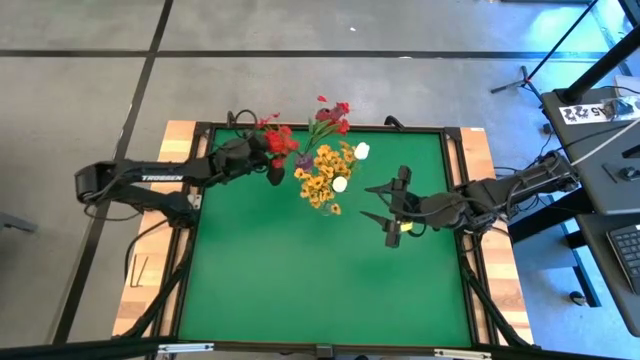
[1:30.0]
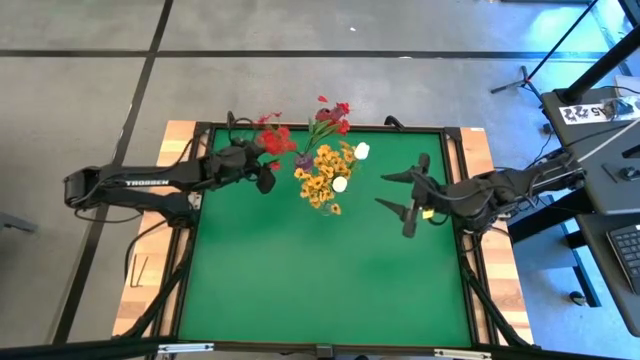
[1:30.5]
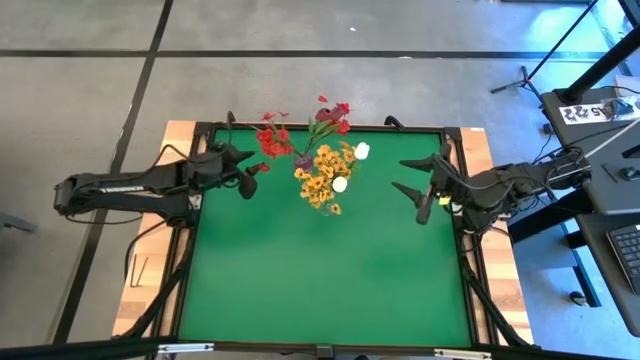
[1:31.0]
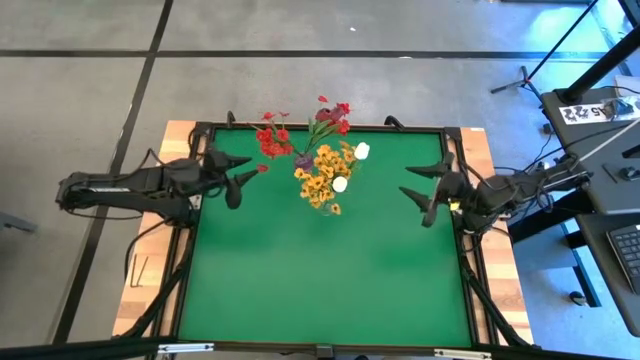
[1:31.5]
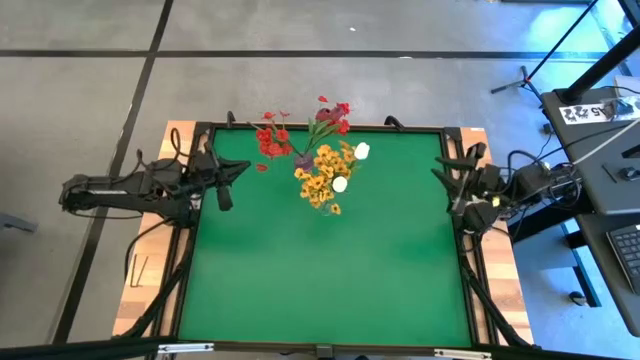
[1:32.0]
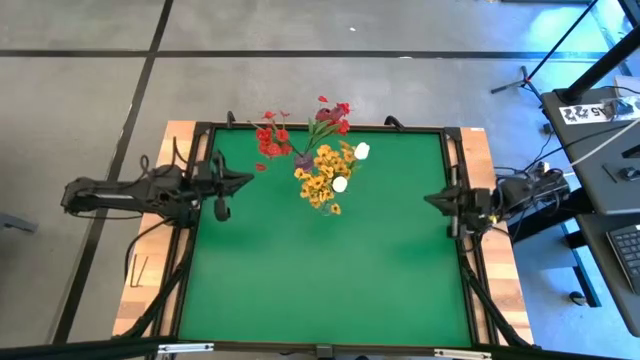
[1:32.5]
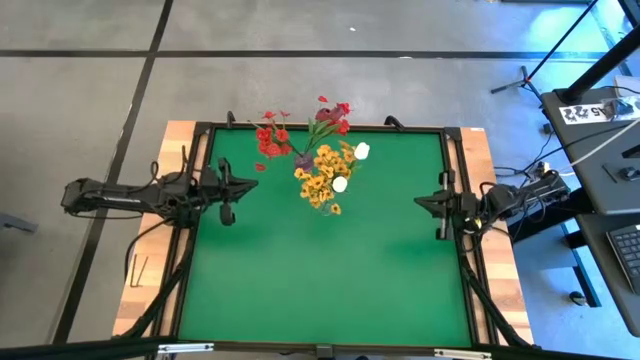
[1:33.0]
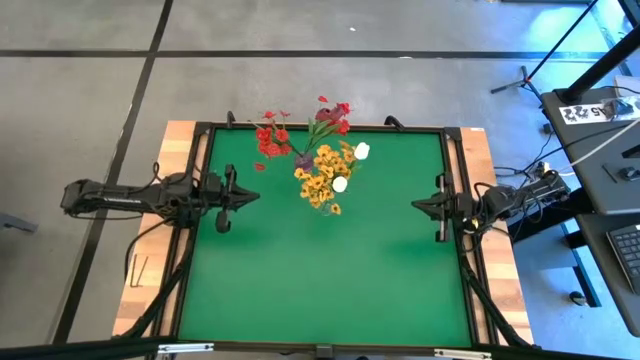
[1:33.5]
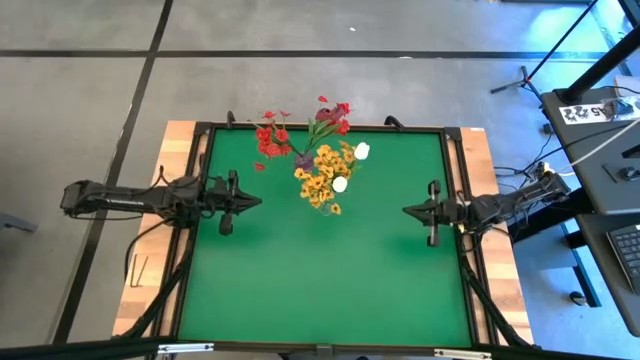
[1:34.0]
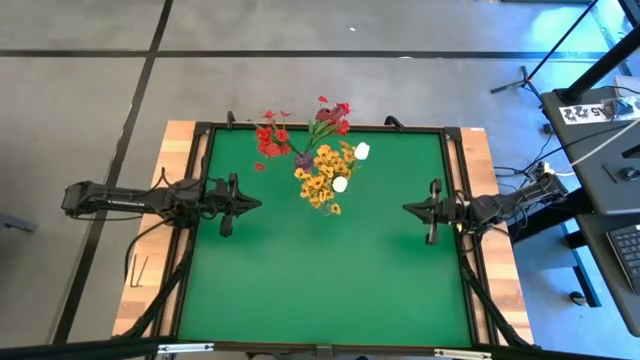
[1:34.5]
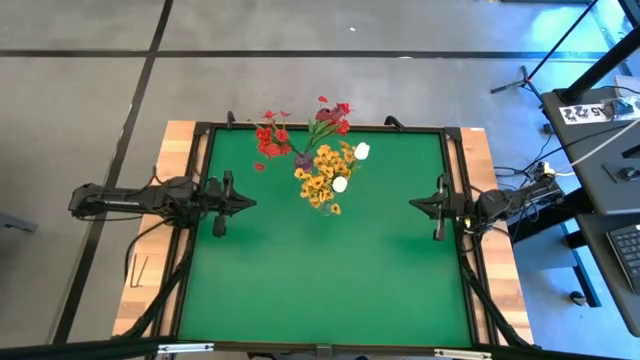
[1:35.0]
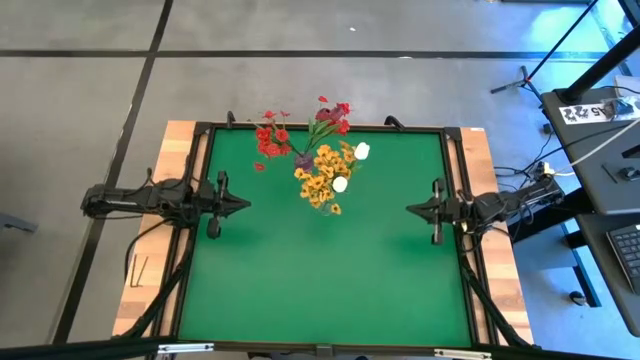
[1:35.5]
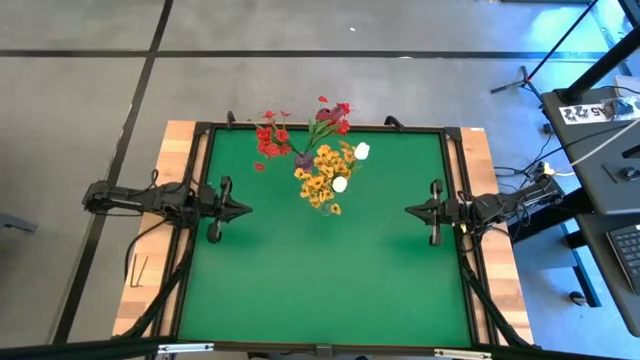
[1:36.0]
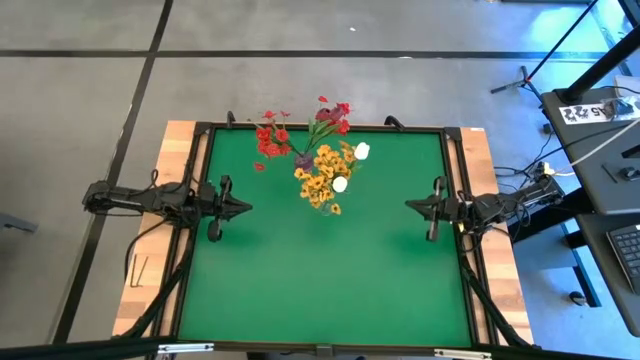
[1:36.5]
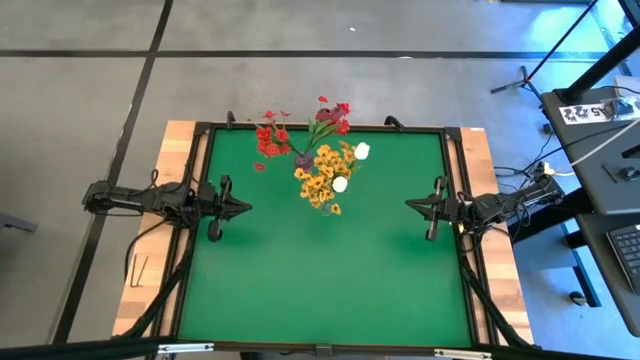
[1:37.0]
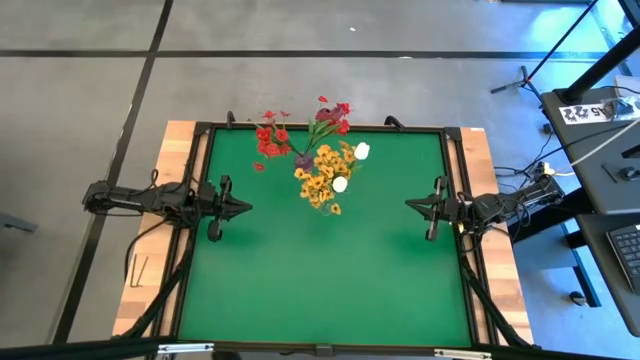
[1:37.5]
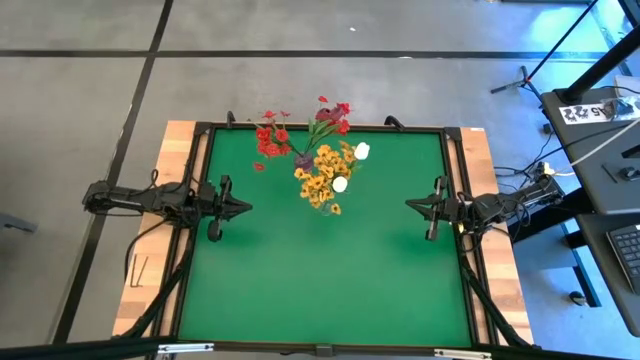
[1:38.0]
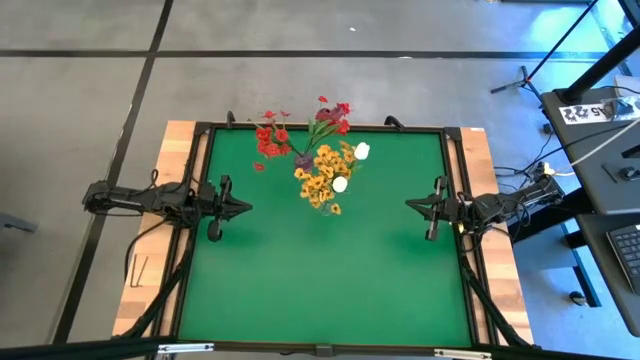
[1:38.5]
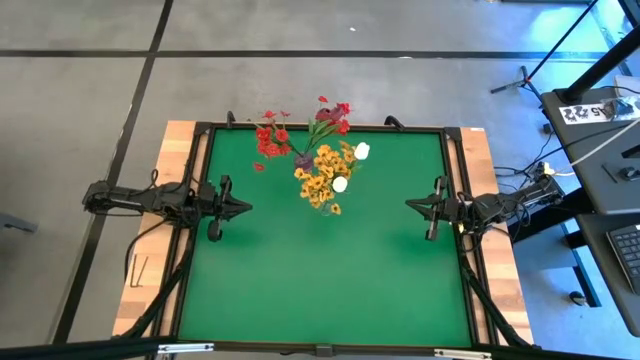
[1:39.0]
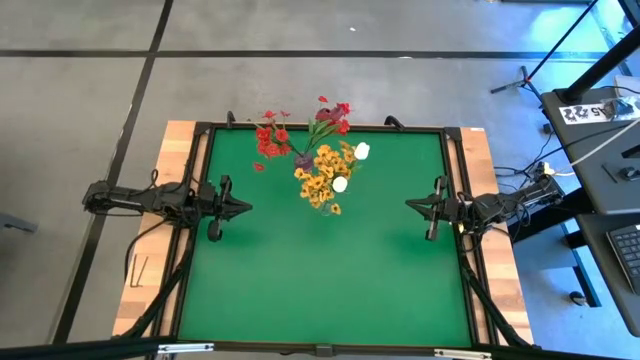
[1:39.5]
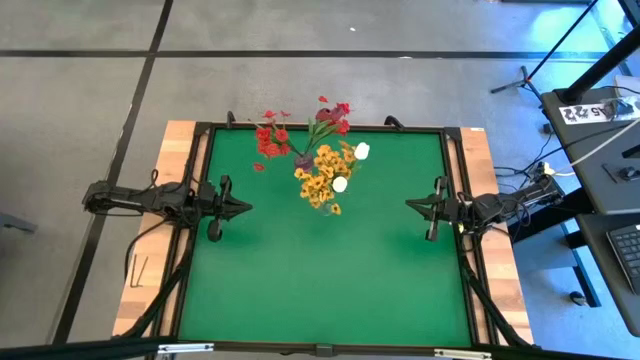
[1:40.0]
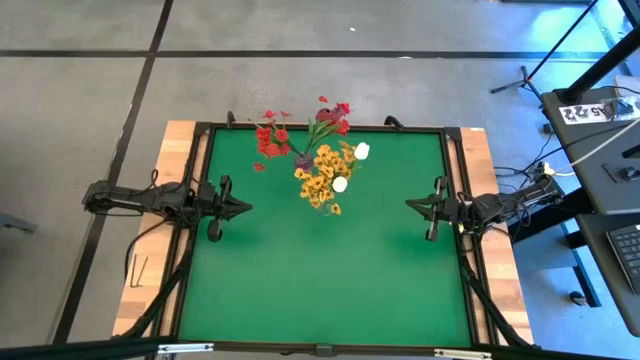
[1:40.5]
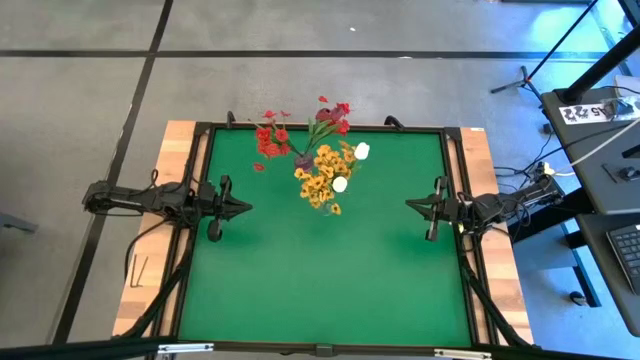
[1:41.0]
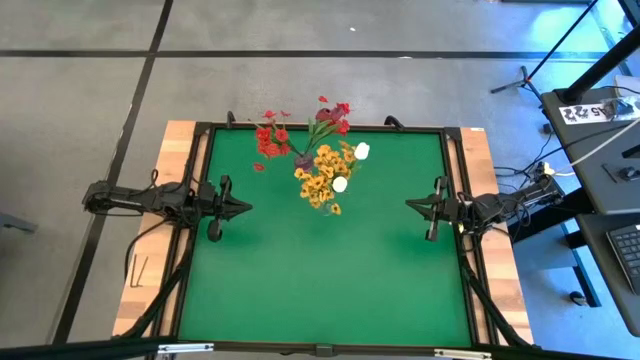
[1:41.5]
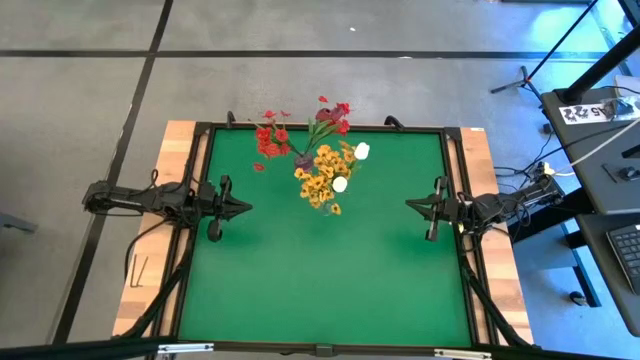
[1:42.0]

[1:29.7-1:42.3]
Task: Sort flowers into vase by color
Return to Home Position

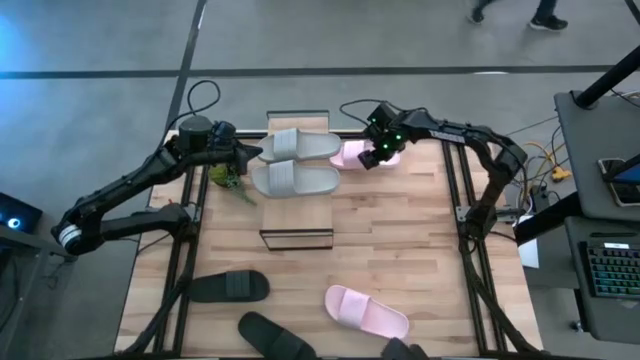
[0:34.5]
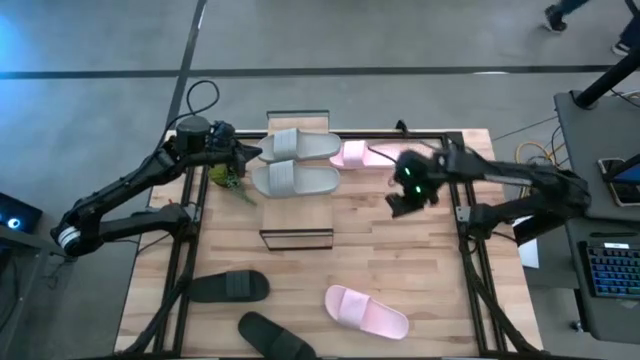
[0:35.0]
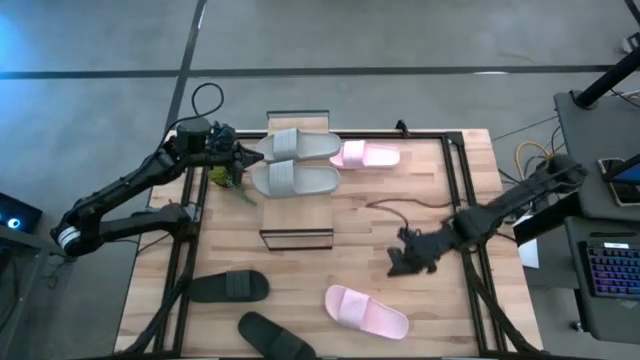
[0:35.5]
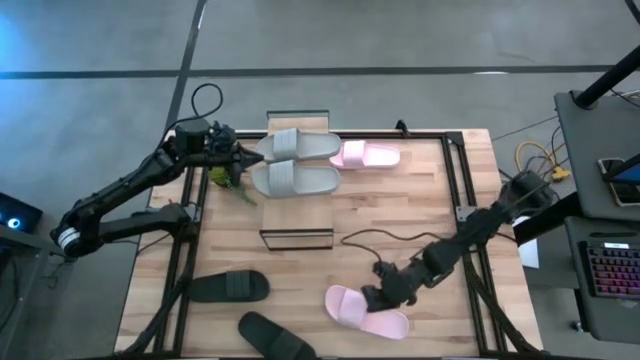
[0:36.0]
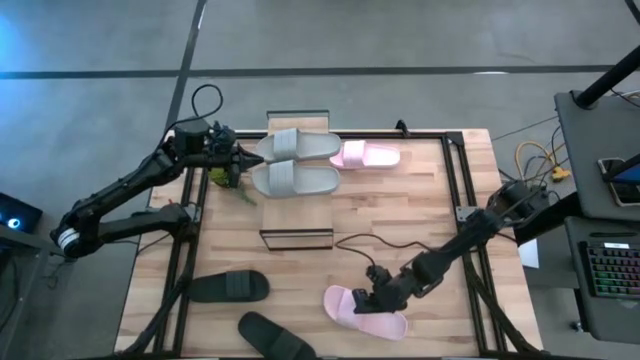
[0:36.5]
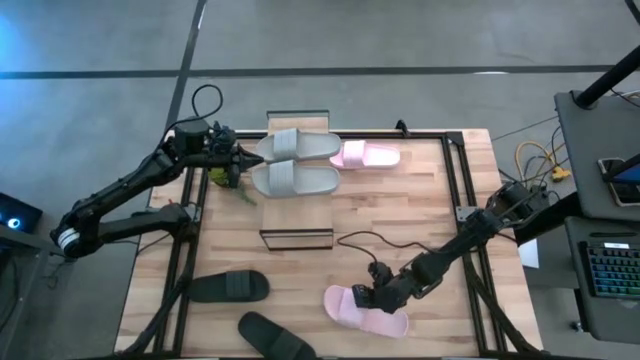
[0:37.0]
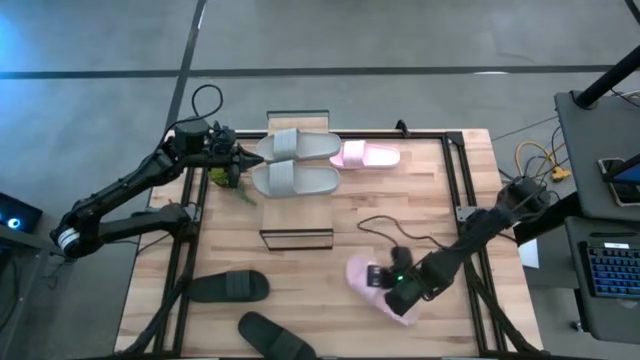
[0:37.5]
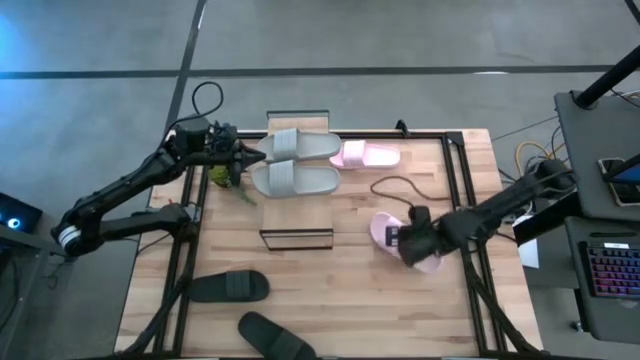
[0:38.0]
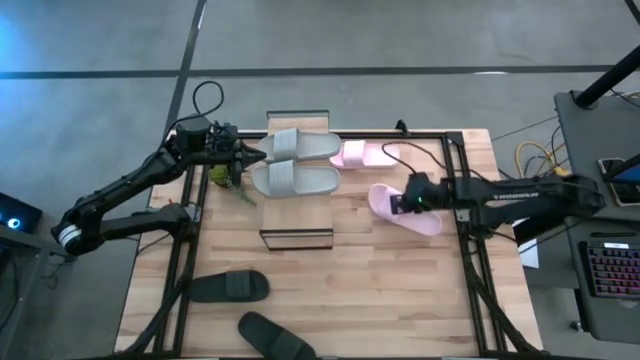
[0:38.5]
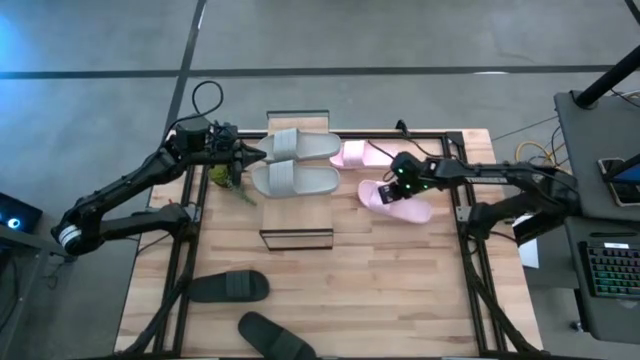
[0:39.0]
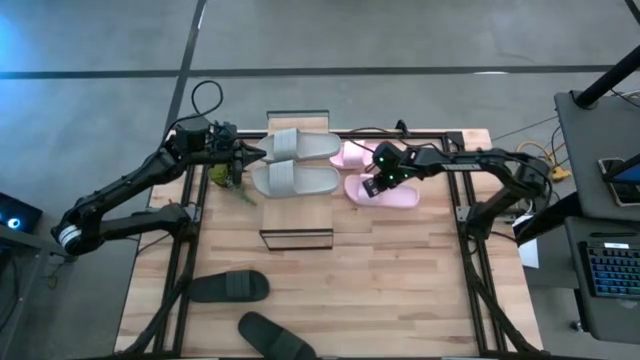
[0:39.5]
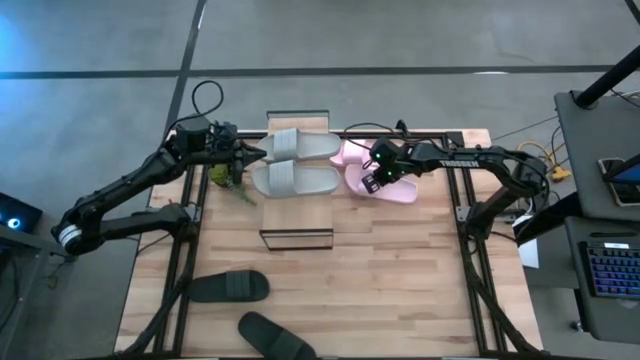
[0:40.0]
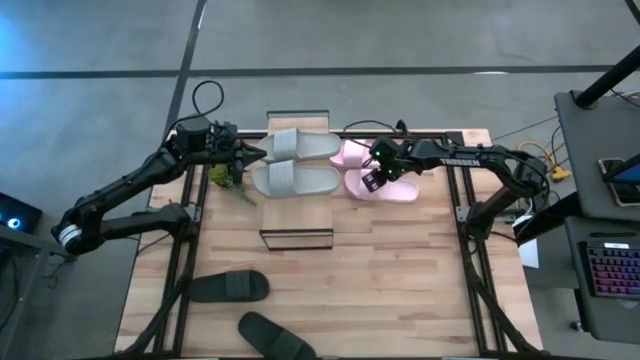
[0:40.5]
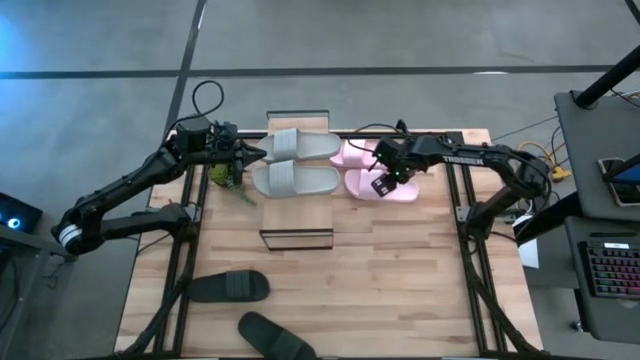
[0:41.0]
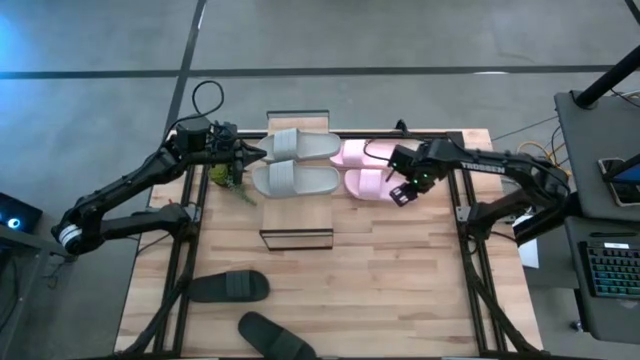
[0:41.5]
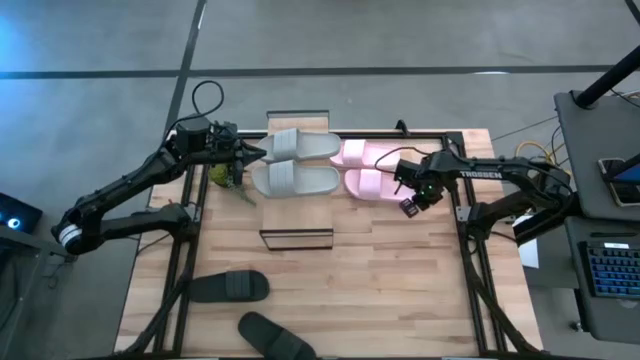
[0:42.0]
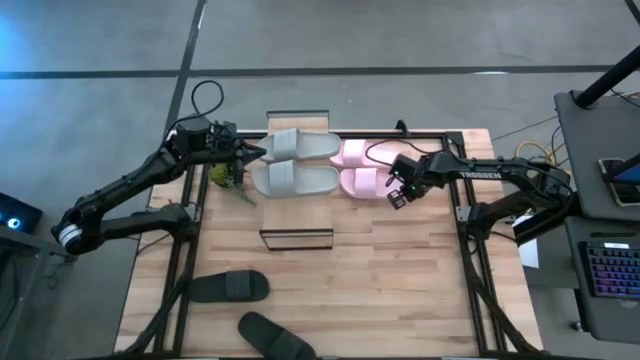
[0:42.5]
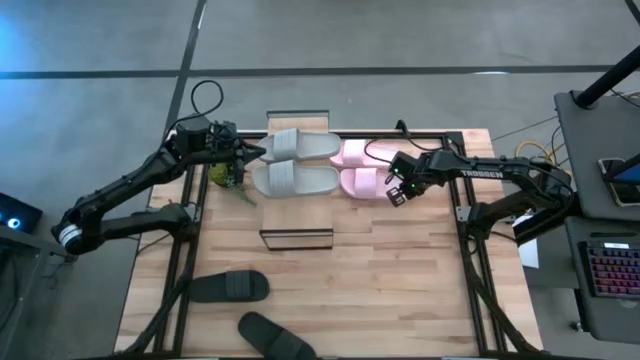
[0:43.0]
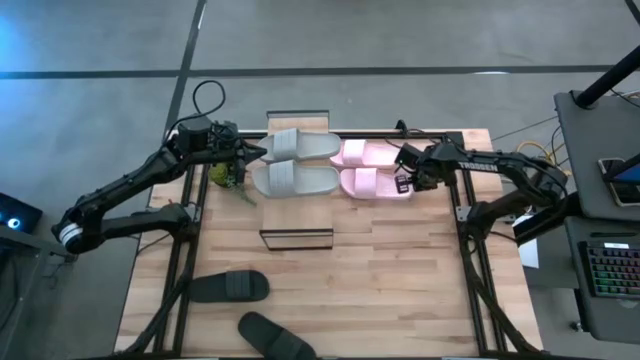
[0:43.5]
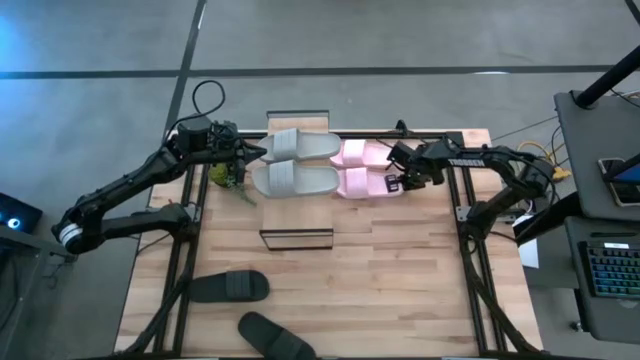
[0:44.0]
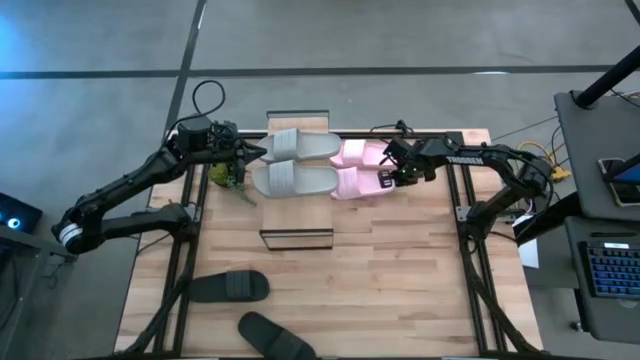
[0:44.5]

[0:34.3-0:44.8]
Task: Pick and place slides into the shelf
Move the pink slide to the upper middle of the table aligned with the other pink slide
